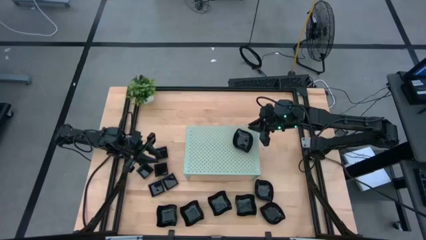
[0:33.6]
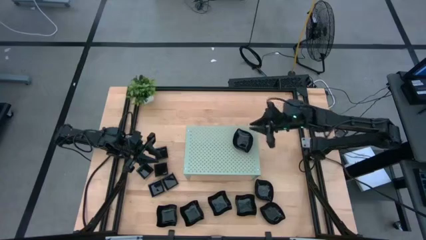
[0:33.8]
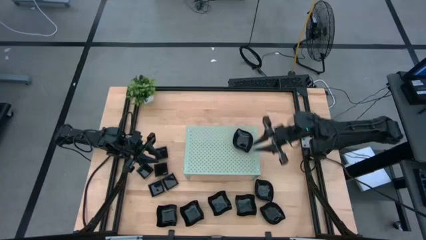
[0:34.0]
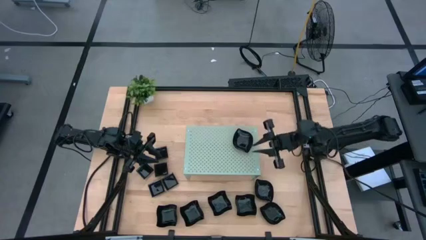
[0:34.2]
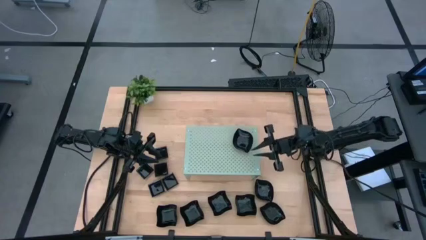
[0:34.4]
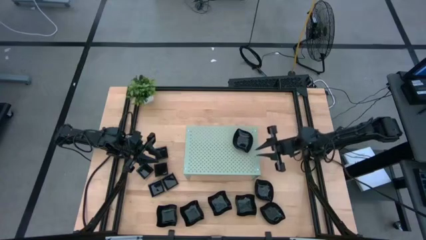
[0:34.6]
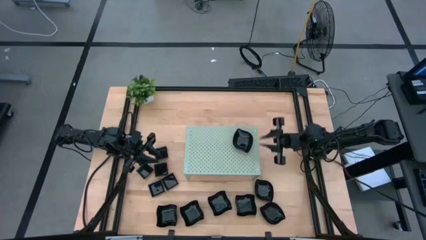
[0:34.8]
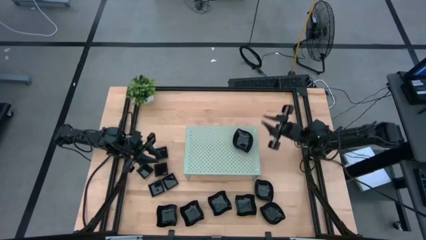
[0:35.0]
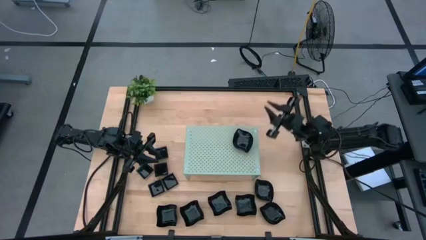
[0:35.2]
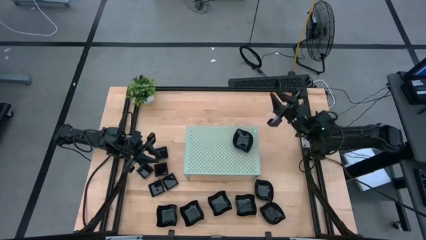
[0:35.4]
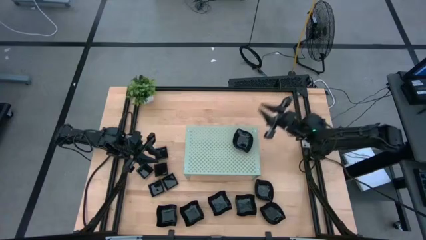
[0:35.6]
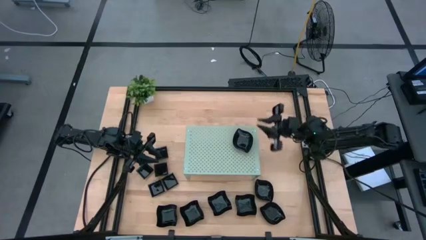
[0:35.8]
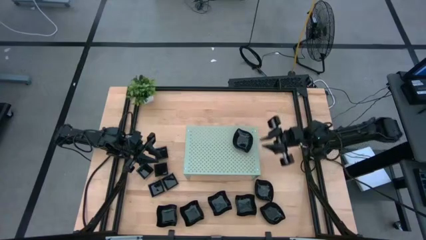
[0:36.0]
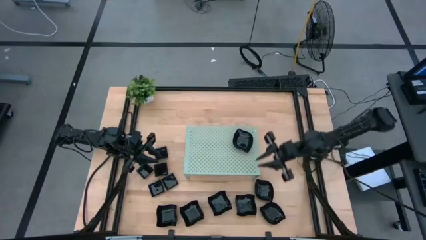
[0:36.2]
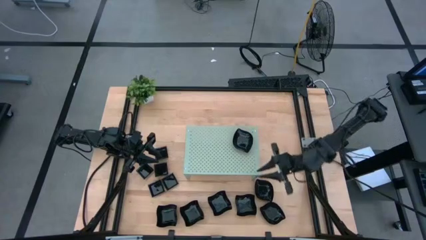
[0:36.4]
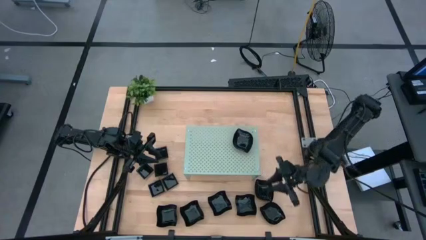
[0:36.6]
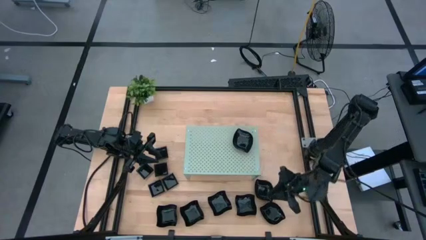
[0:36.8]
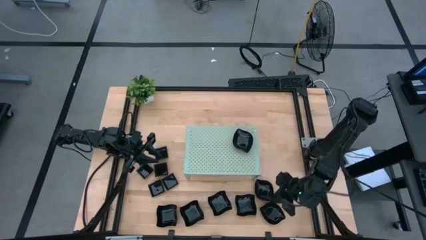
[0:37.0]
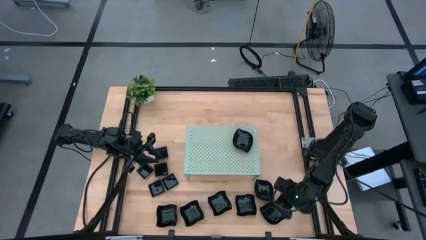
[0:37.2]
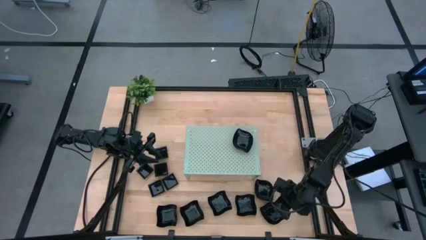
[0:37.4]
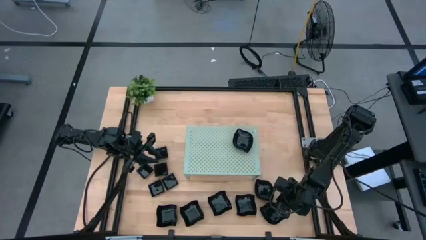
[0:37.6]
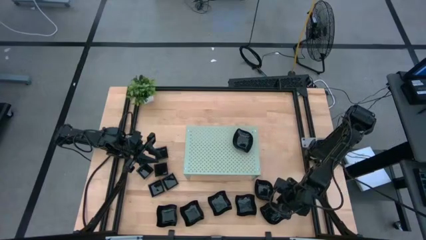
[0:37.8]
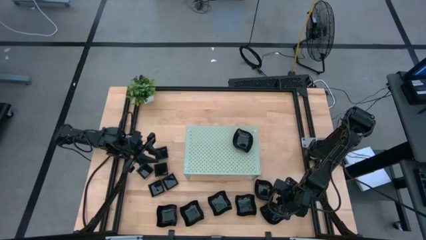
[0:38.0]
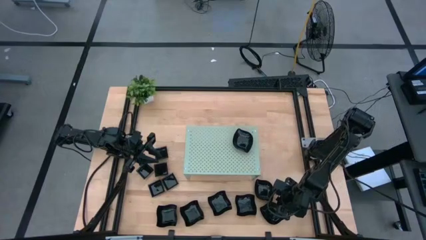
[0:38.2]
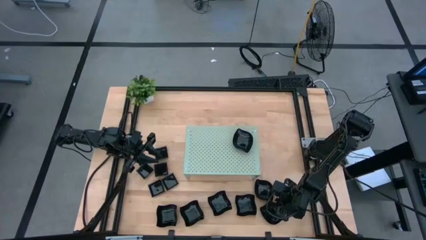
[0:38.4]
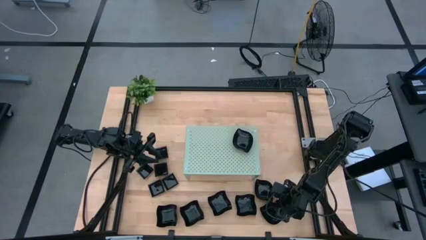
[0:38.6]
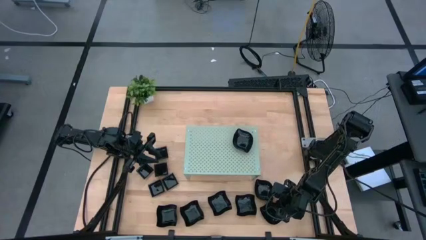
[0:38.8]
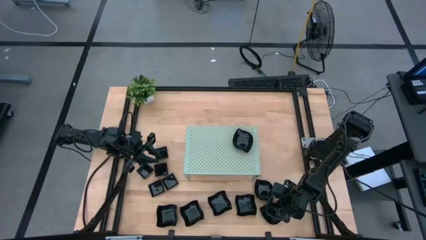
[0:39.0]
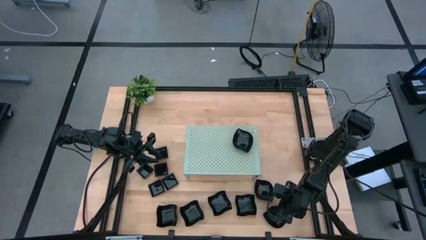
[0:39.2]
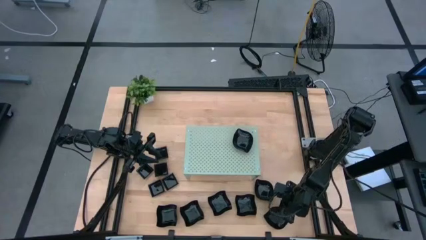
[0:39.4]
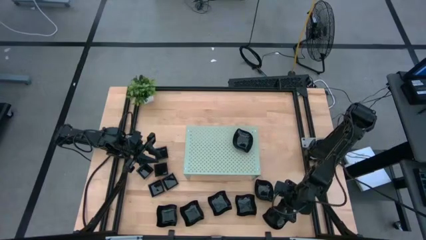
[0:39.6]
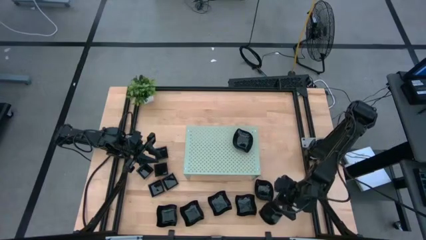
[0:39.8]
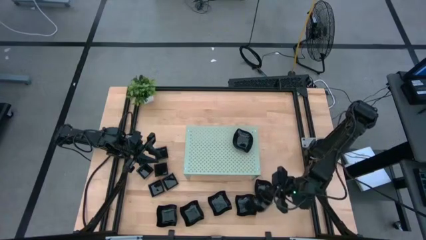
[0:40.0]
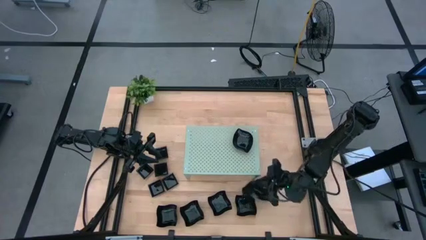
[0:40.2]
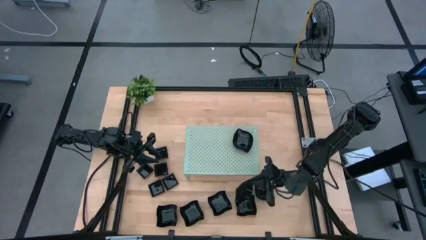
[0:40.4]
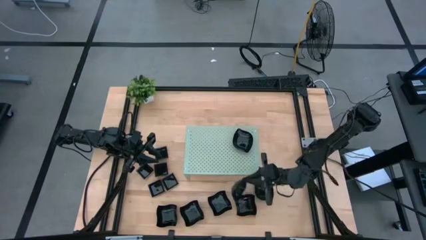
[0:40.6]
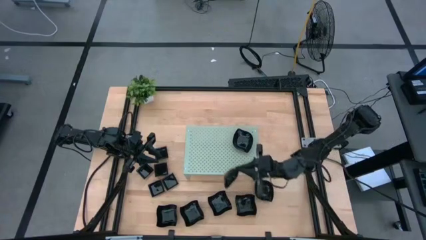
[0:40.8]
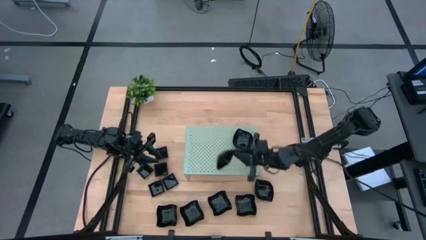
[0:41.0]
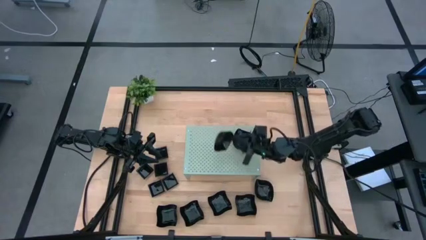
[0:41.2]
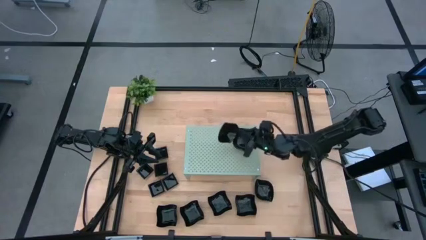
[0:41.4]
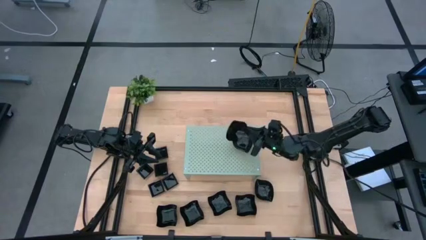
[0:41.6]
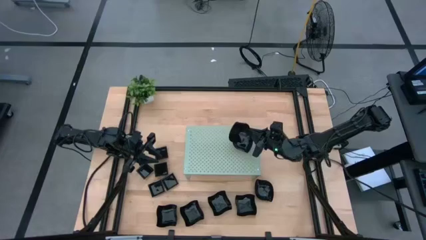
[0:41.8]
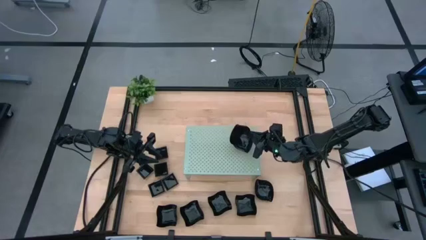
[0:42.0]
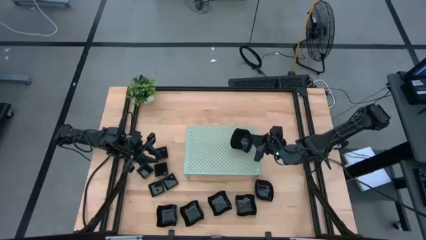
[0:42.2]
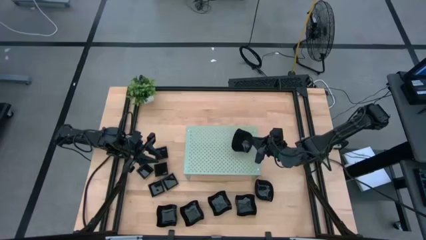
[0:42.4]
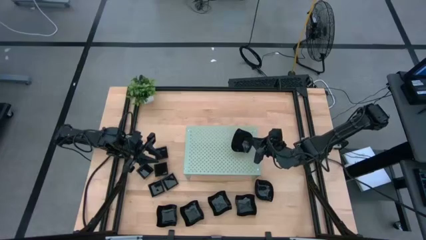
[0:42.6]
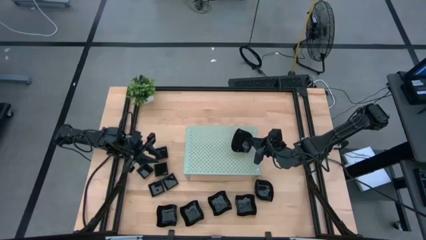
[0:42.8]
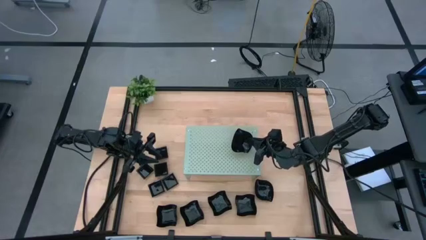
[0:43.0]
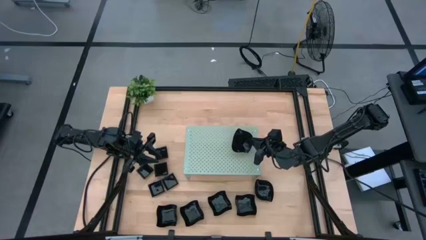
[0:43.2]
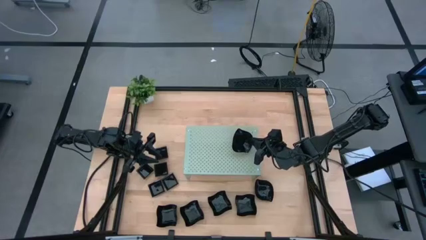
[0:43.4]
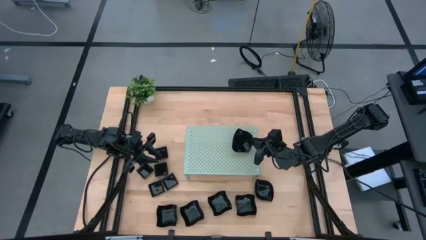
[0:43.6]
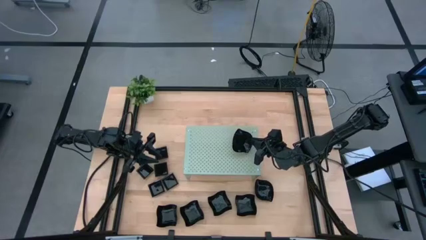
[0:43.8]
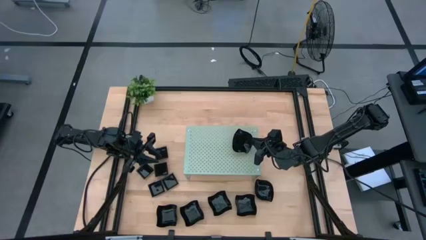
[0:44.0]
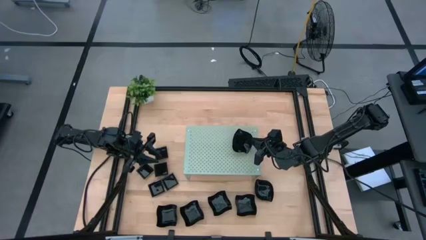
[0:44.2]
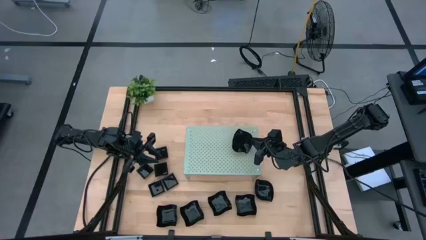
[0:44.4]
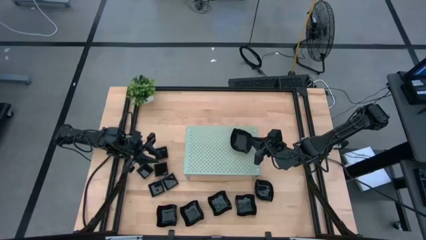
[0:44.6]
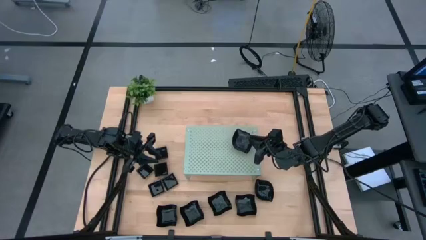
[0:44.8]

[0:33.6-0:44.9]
Task: Pick & Place Mini shaped plates
Stack the leaf-shaped plate on top of the leaf-shaped plate on the shelf

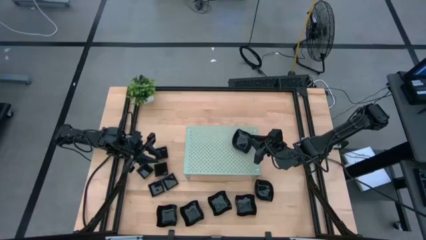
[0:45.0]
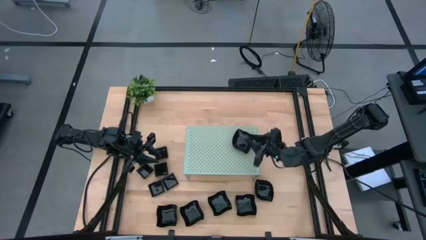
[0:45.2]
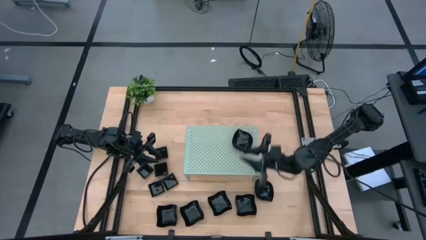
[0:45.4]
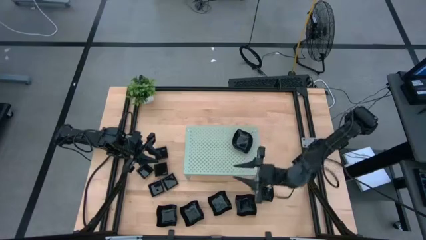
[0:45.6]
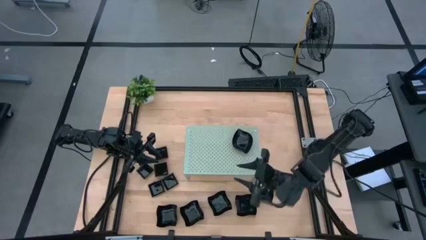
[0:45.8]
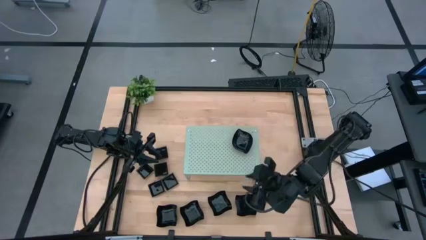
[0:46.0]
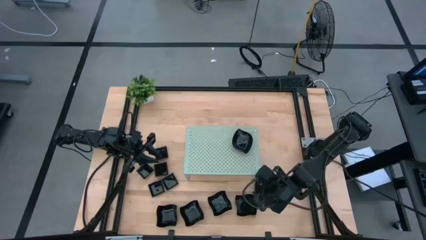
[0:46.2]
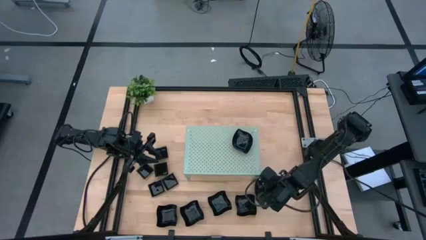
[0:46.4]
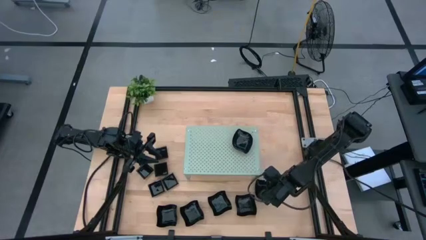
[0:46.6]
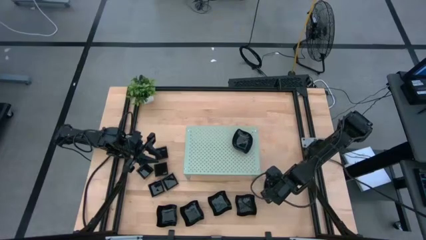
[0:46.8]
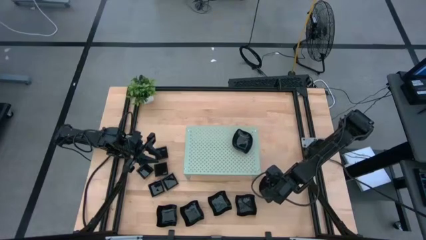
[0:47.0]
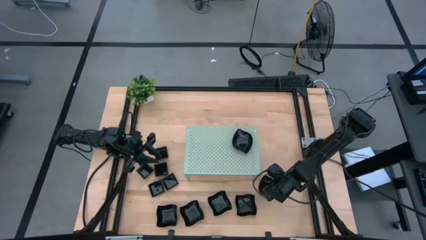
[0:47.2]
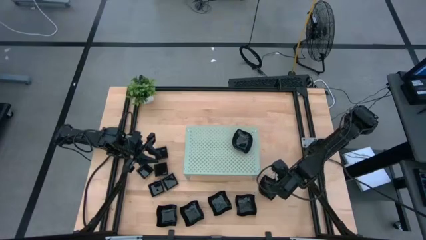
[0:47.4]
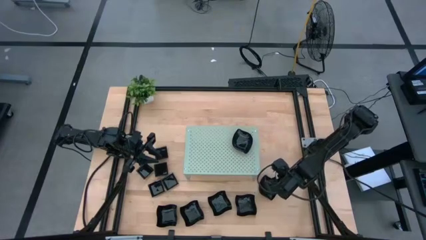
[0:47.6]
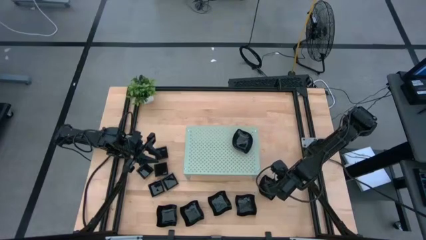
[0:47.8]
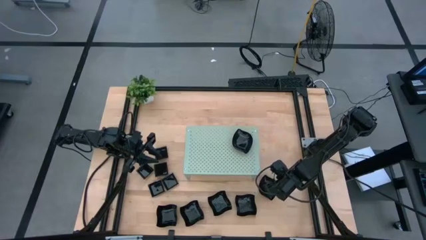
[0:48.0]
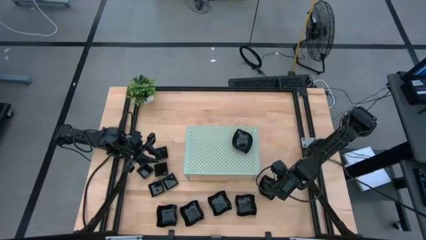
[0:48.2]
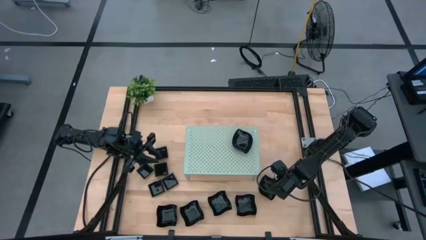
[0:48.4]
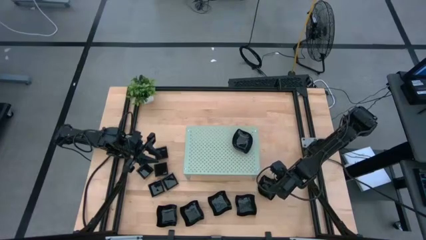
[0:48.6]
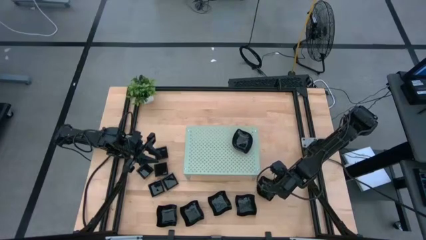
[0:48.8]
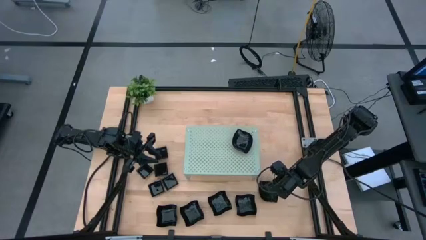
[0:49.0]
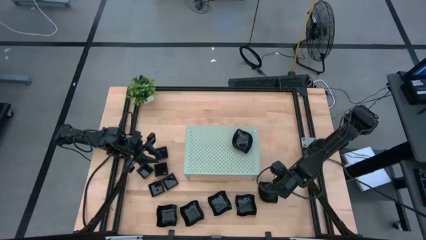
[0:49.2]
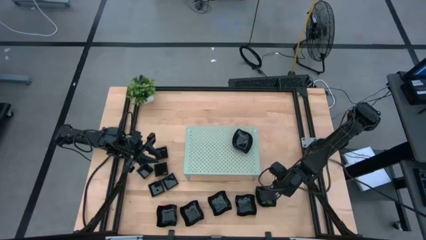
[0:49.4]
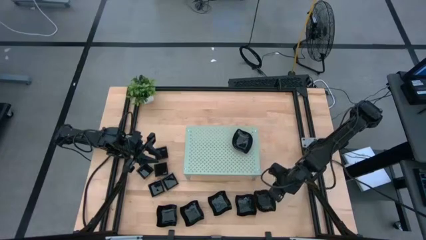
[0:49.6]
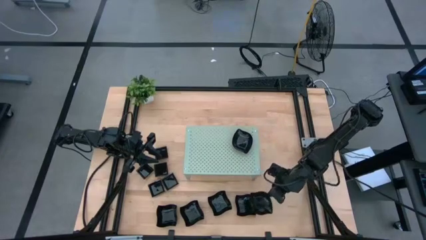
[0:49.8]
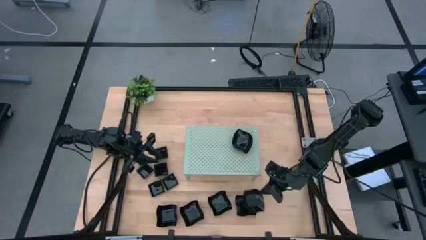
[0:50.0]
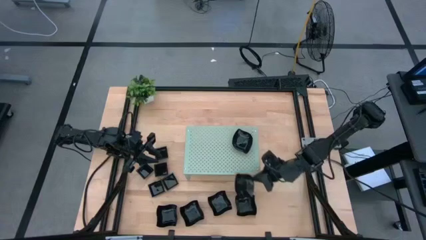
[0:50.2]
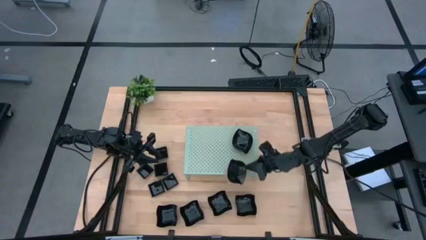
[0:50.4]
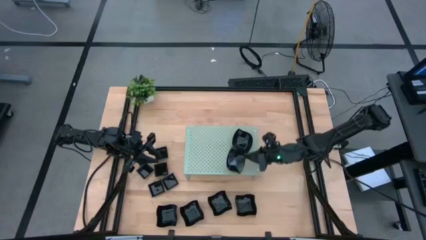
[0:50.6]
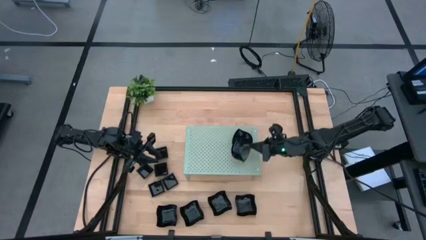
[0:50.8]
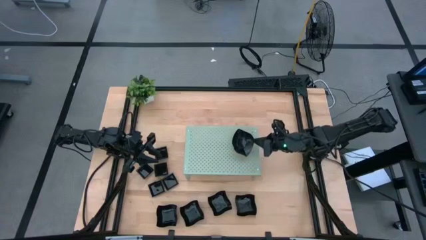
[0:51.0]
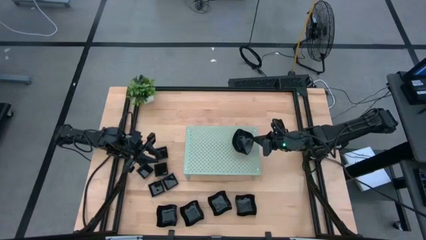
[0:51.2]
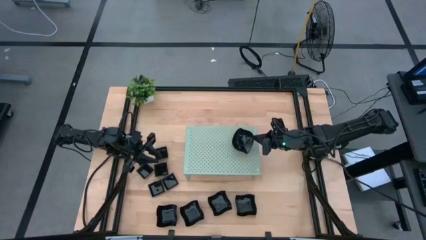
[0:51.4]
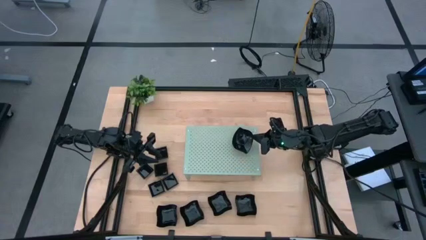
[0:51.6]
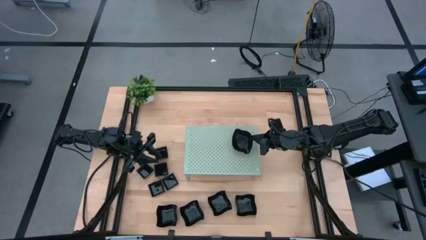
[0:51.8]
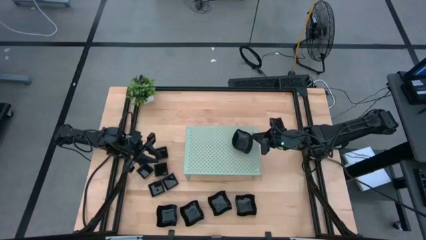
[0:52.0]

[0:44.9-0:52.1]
Stack the leaf-shaped plate on top of the leaf-shaped plate on the shelf
